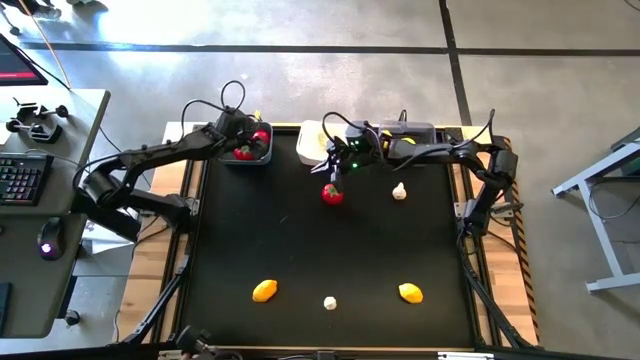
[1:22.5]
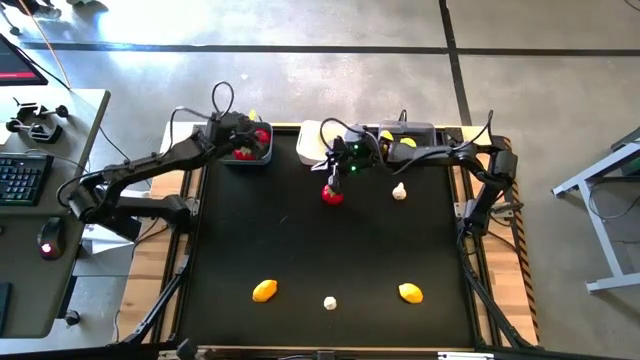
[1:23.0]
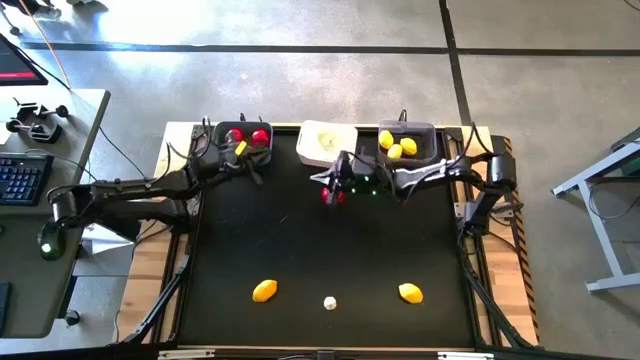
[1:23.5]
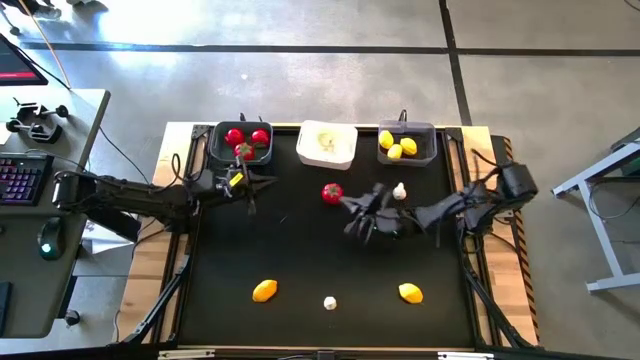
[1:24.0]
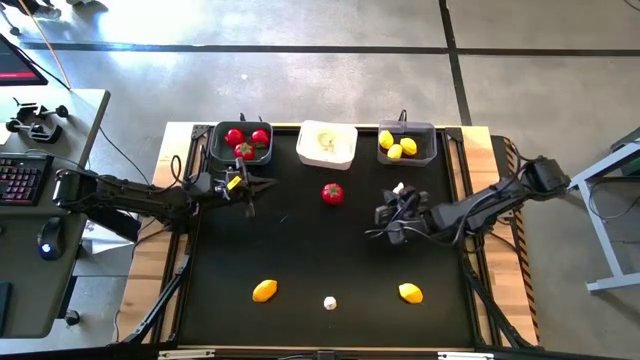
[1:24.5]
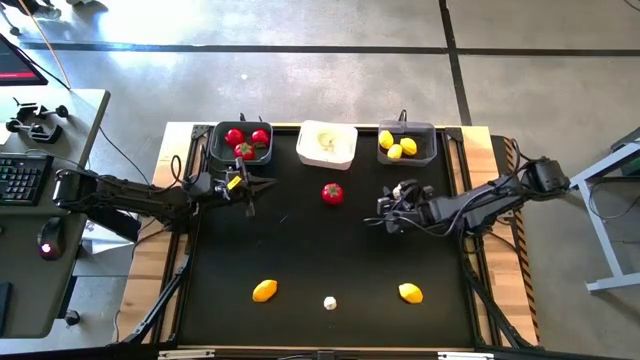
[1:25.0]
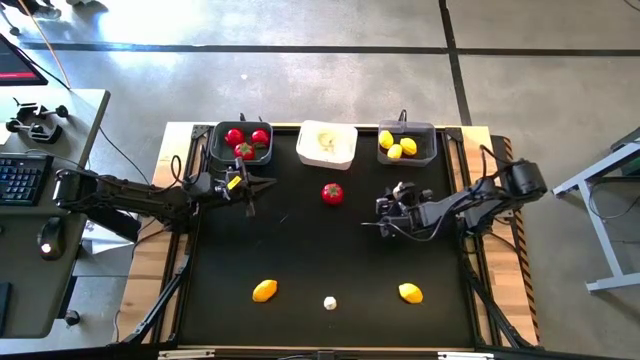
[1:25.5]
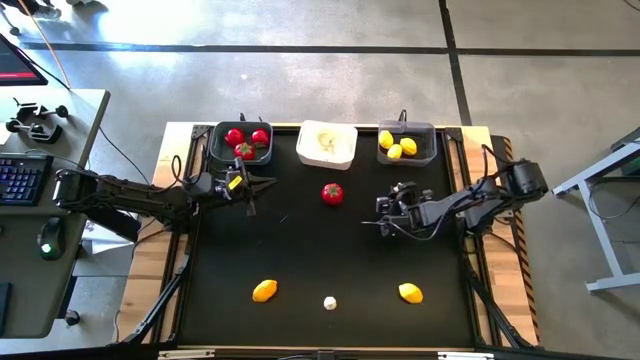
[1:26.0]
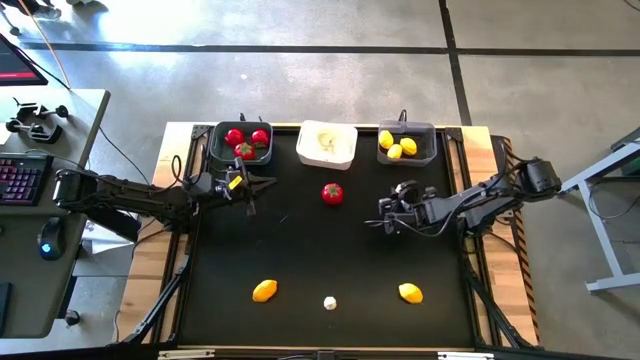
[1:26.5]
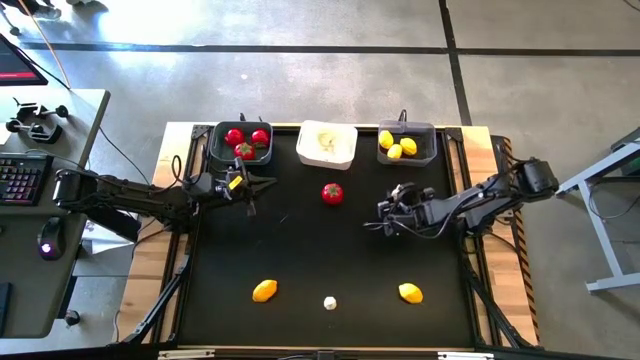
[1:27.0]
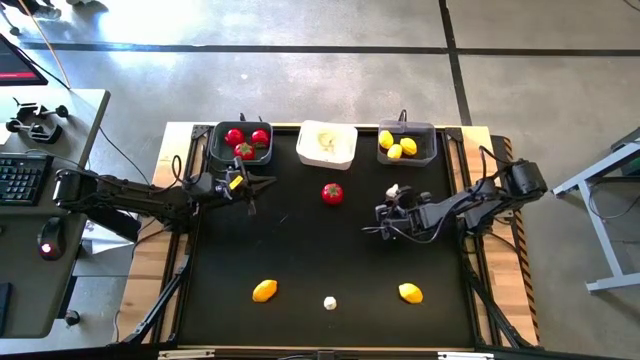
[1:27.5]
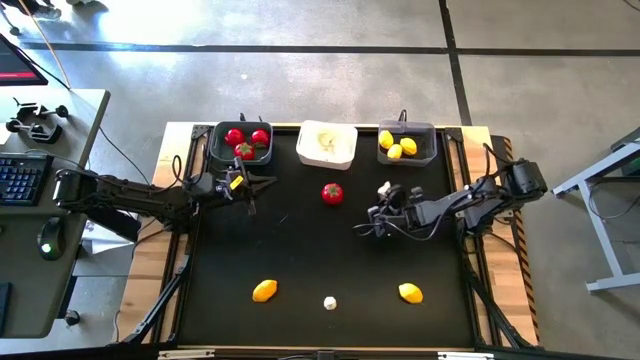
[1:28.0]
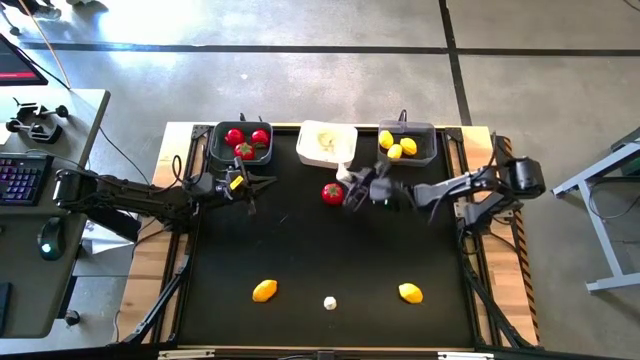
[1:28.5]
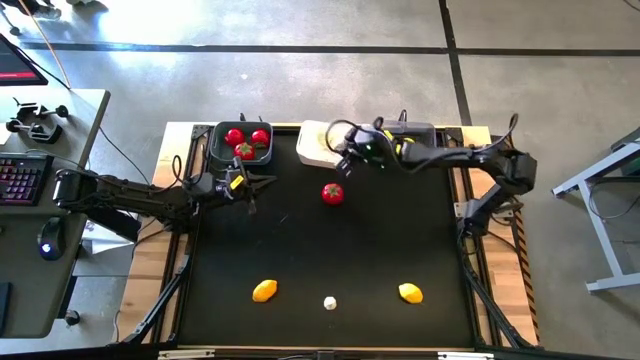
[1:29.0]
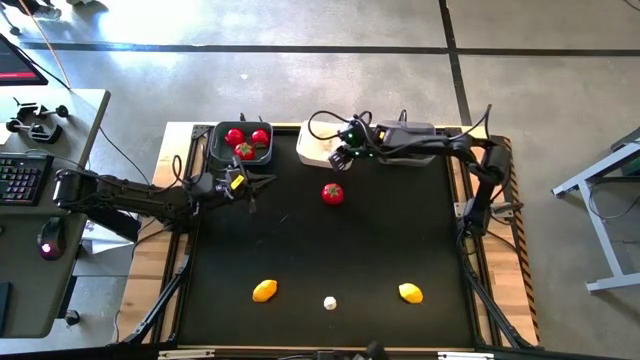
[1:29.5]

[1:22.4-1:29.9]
Task: Sort produce into baskets
Put the top white garlic into the white bin

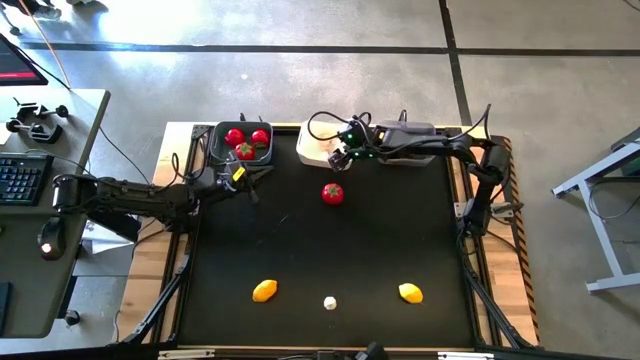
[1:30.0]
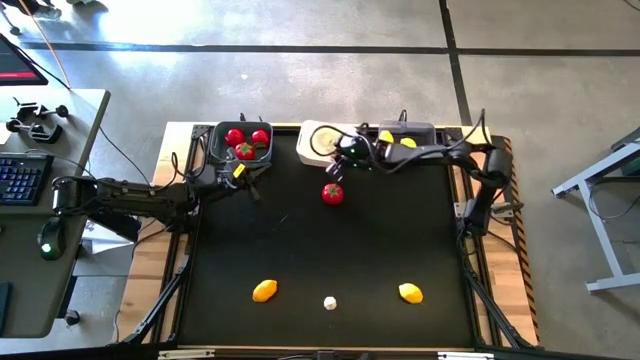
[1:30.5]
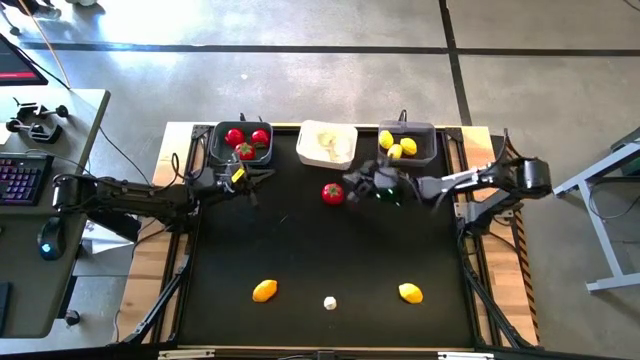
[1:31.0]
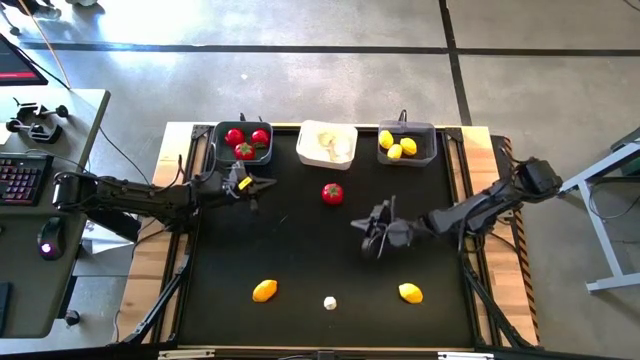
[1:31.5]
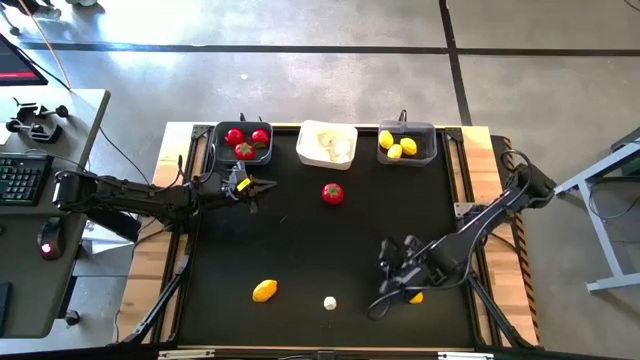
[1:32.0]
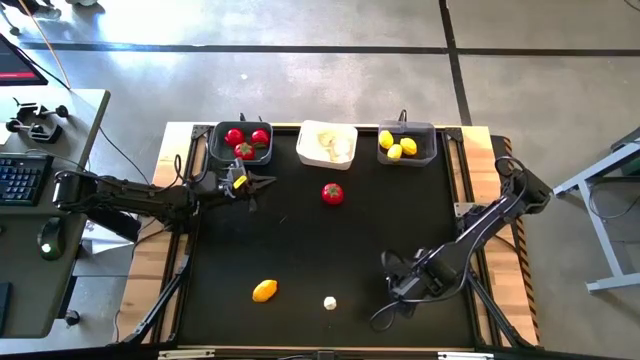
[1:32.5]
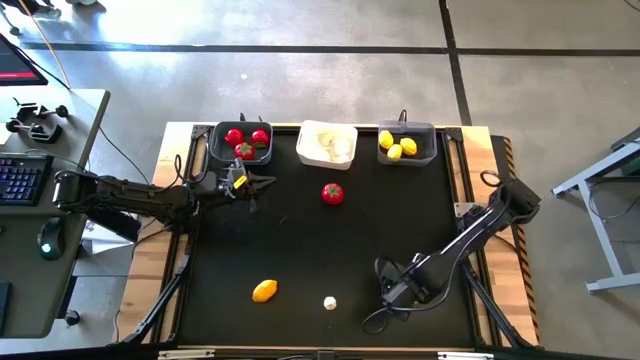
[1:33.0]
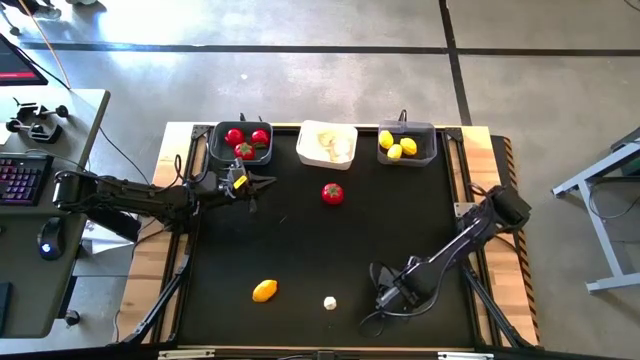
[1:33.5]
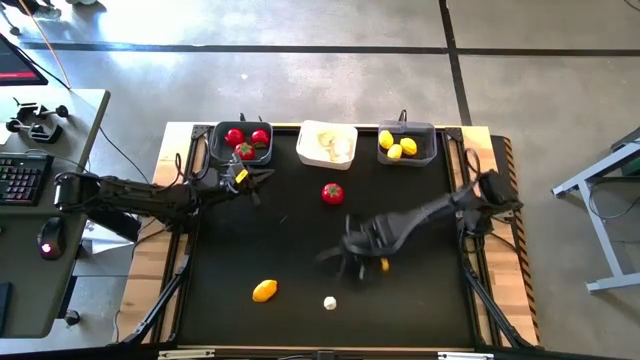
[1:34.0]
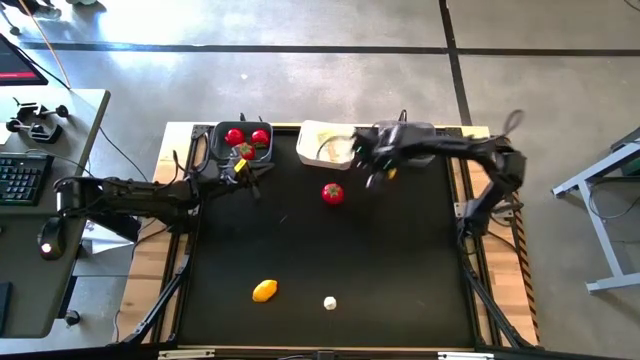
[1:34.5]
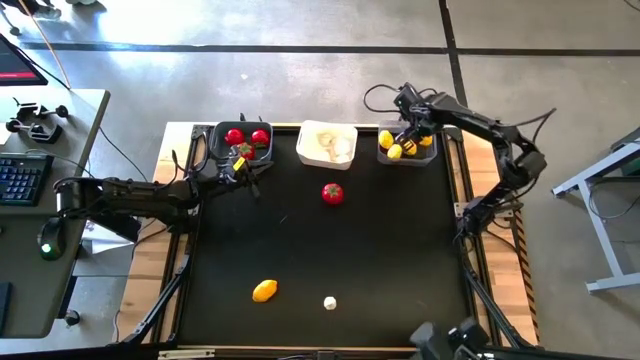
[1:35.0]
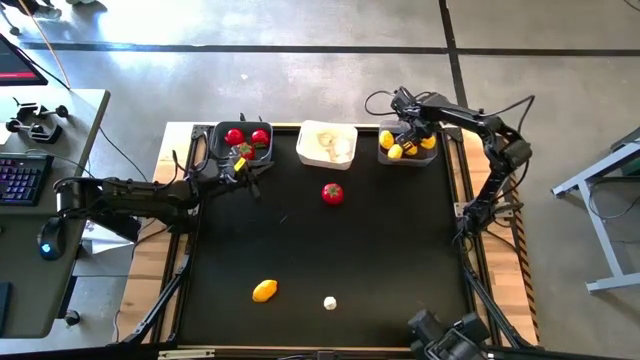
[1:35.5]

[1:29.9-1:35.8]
Put the right yellow lemon into the transparent bin

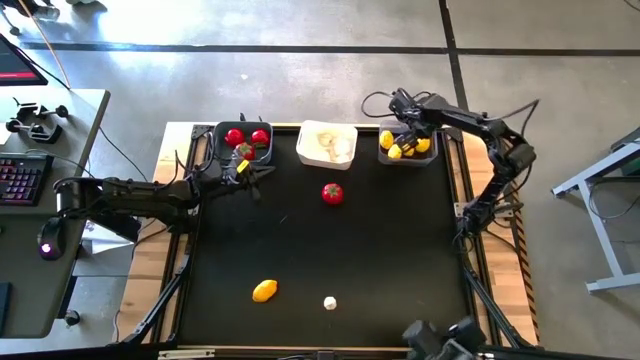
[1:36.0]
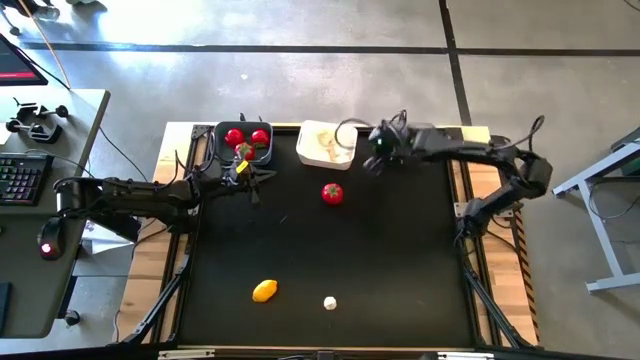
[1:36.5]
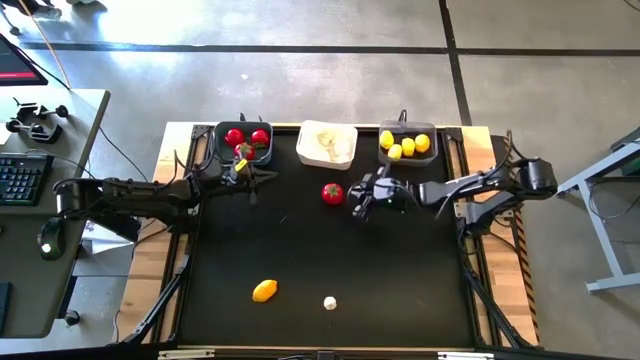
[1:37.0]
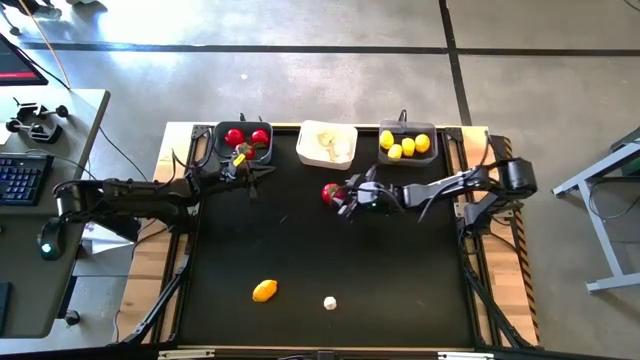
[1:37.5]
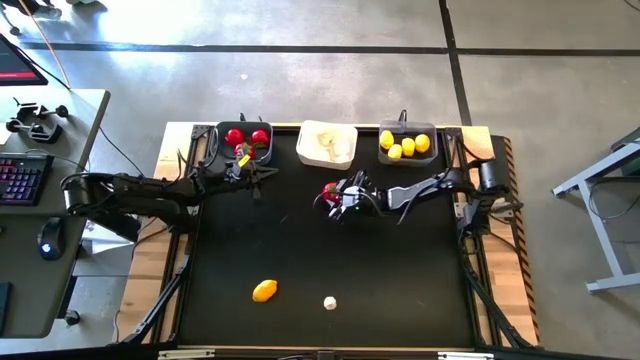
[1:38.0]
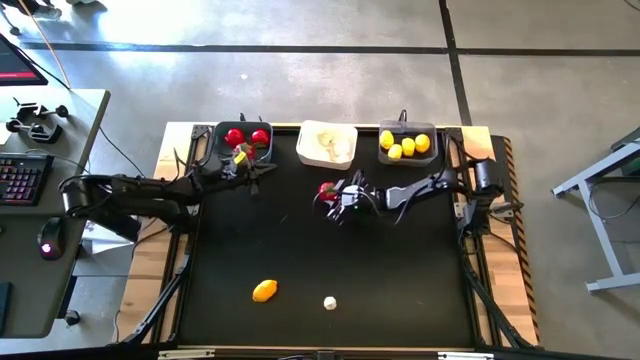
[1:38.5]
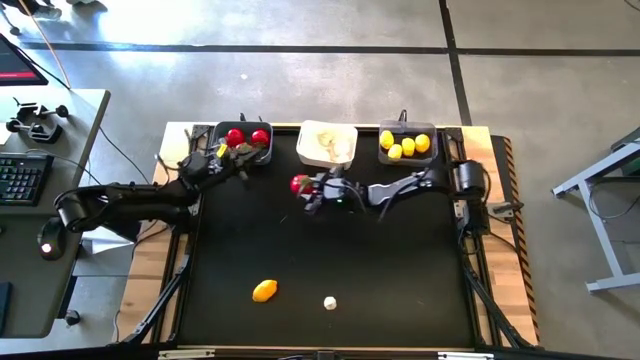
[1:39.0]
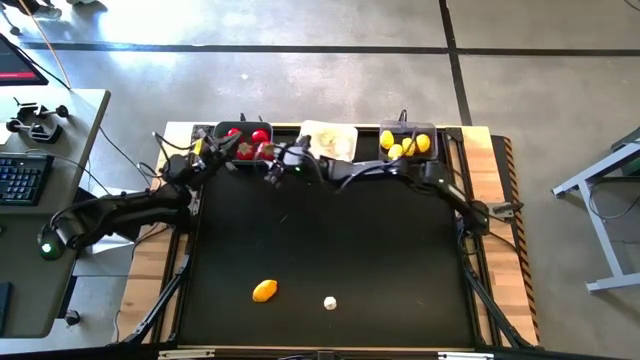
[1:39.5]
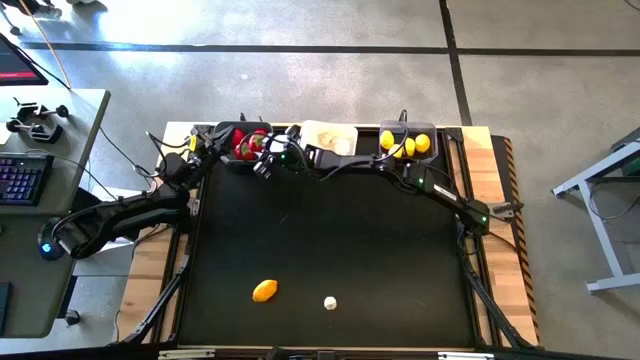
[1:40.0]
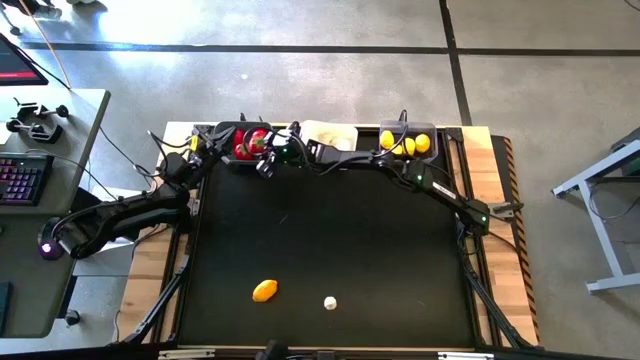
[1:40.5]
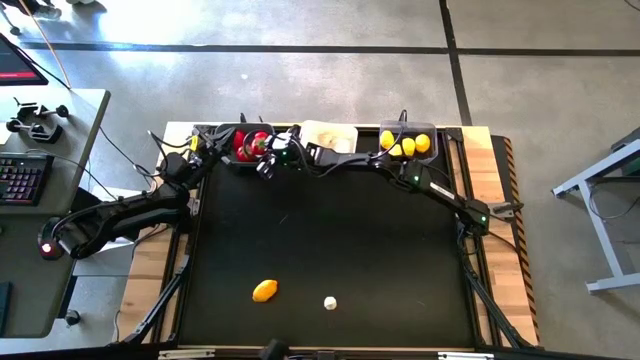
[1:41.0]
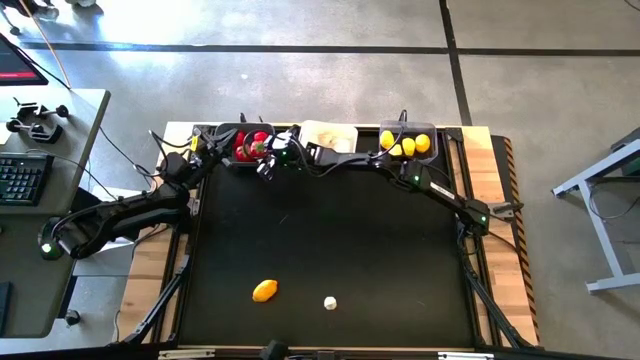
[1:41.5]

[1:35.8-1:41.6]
Put the red tomato into the gray bin

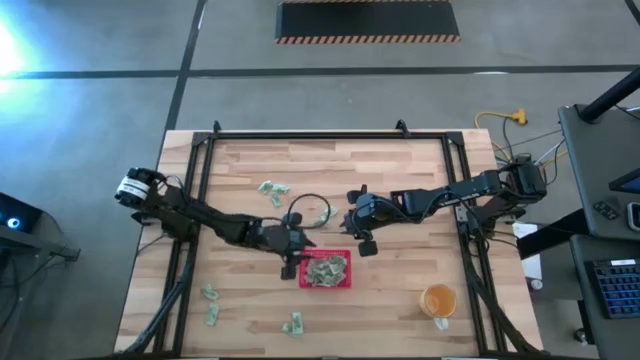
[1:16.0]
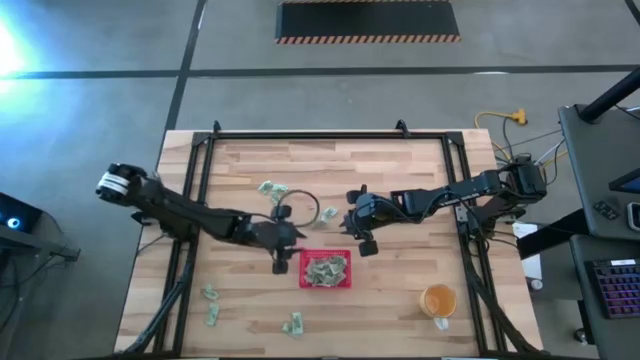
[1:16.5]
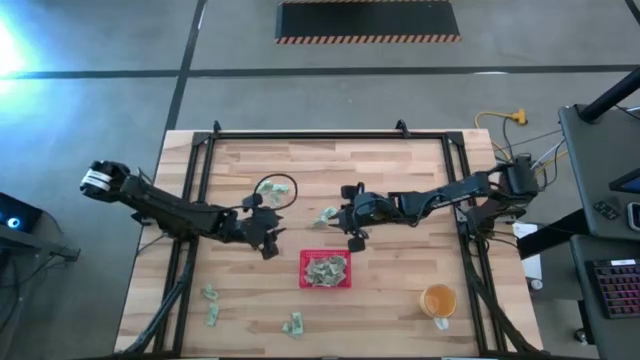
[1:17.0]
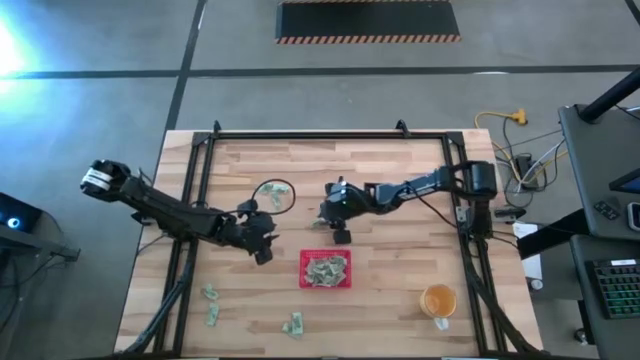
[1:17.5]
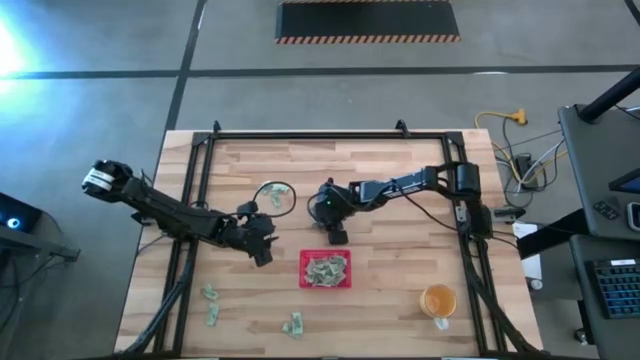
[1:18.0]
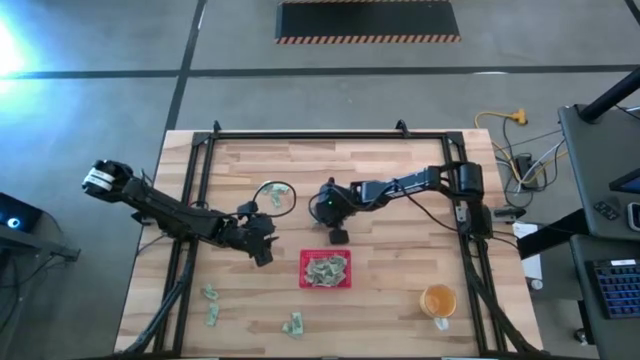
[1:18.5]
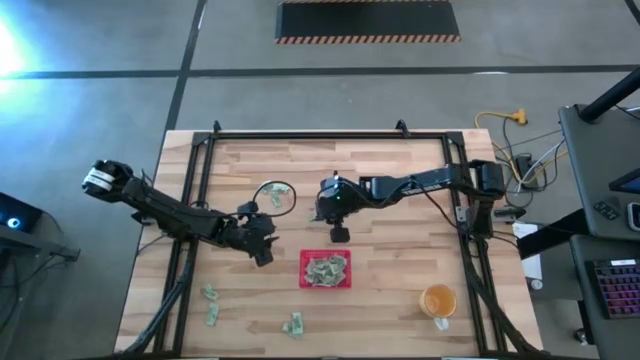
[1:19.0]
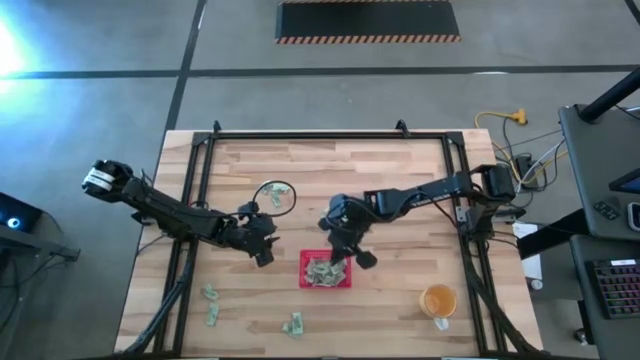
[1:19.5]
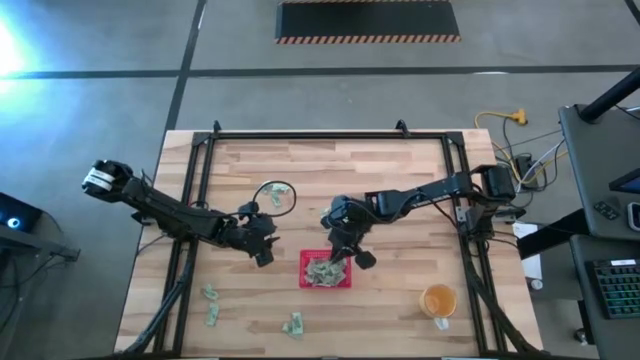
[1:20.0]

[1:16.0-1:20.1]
Task: Pick and place Stevia / Truvia into bins
Put the white stevia packet into the red bin
